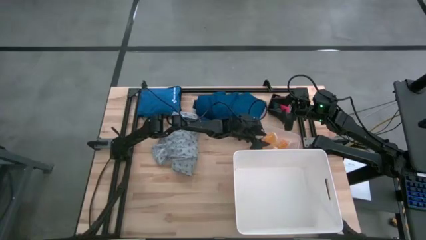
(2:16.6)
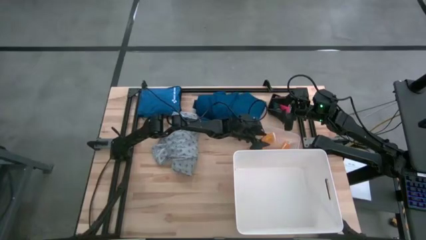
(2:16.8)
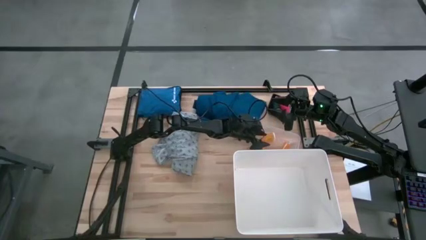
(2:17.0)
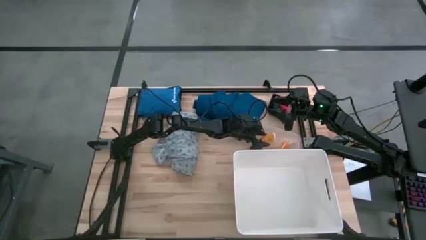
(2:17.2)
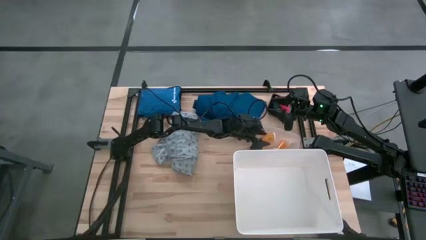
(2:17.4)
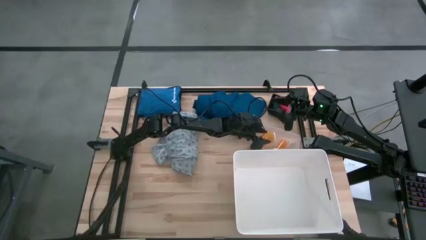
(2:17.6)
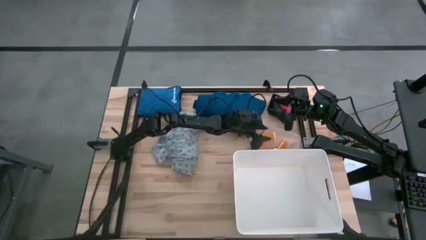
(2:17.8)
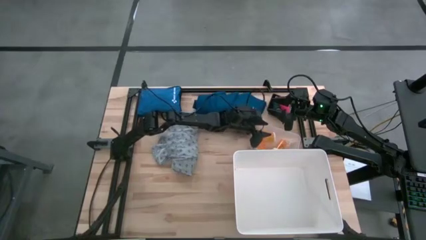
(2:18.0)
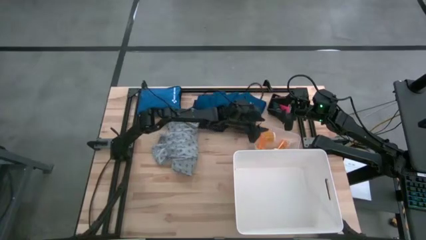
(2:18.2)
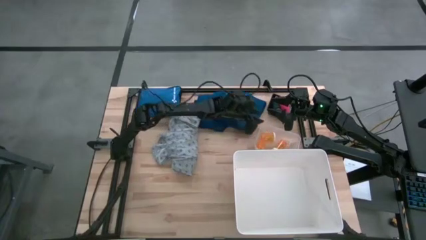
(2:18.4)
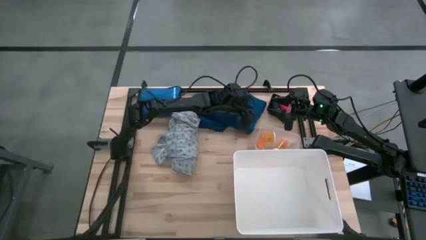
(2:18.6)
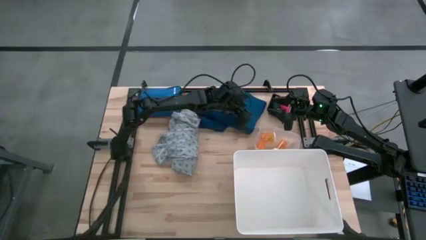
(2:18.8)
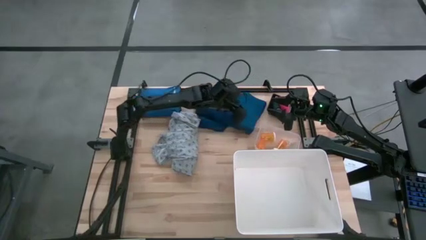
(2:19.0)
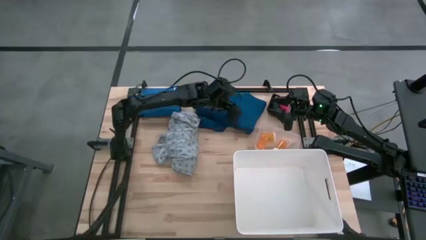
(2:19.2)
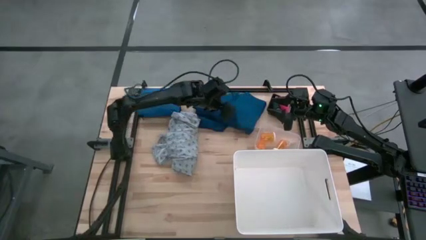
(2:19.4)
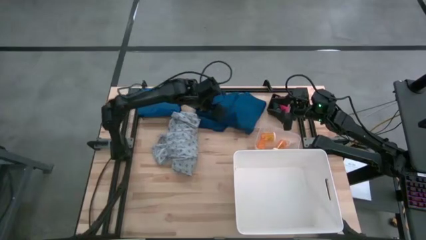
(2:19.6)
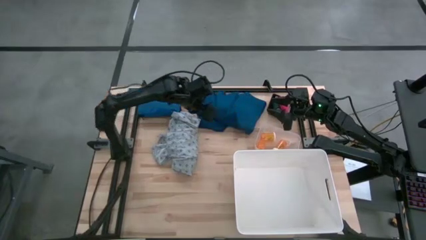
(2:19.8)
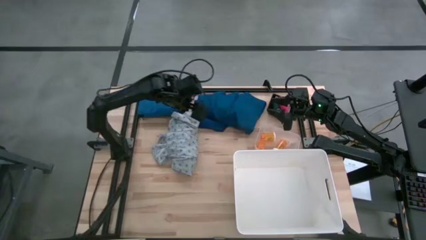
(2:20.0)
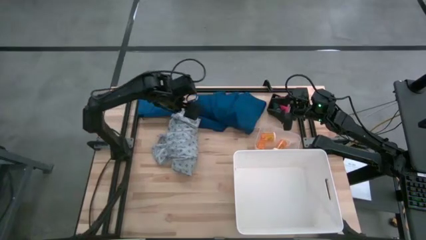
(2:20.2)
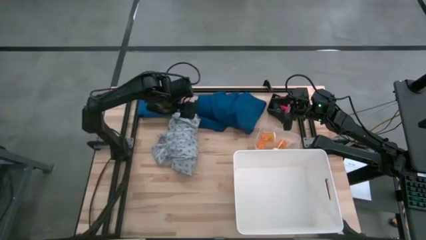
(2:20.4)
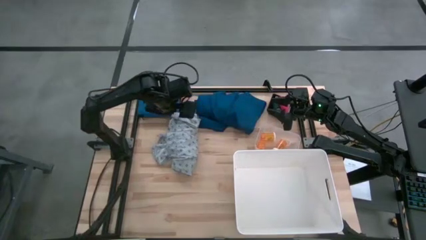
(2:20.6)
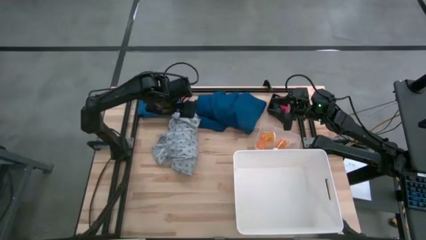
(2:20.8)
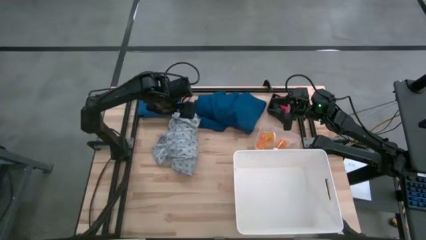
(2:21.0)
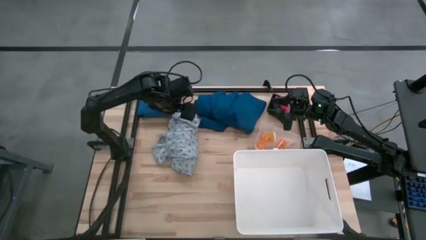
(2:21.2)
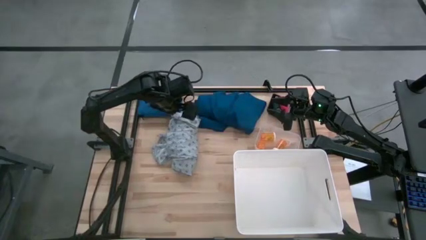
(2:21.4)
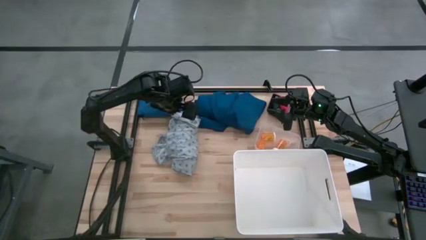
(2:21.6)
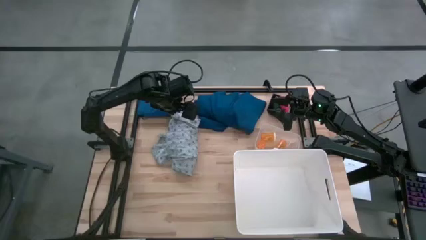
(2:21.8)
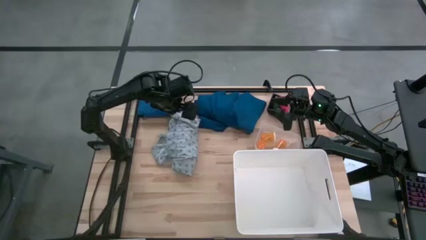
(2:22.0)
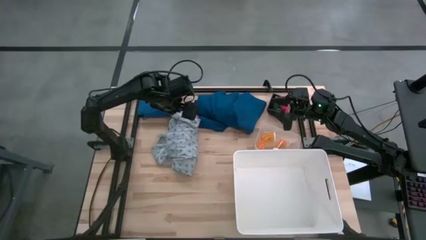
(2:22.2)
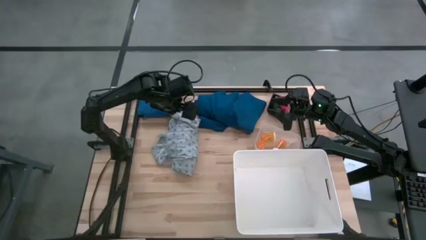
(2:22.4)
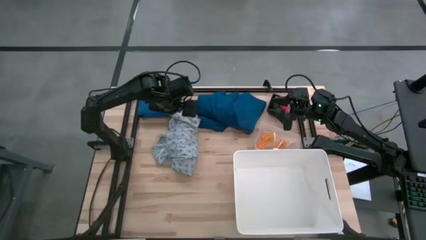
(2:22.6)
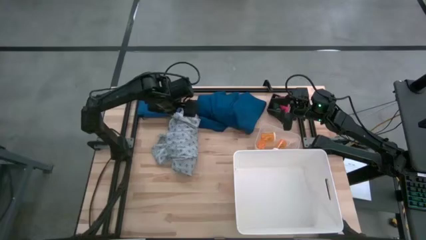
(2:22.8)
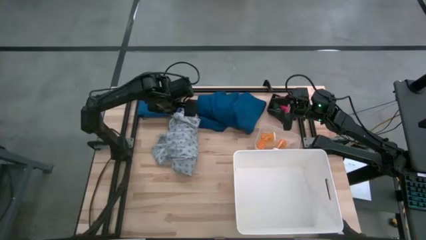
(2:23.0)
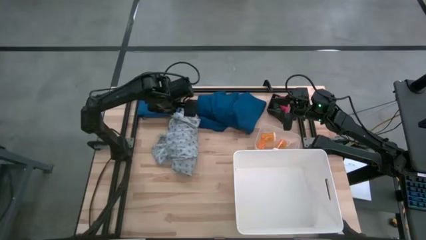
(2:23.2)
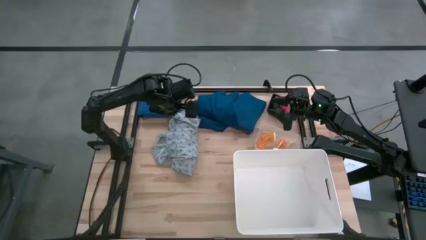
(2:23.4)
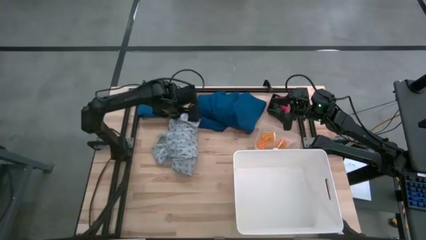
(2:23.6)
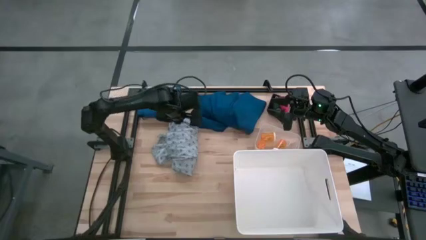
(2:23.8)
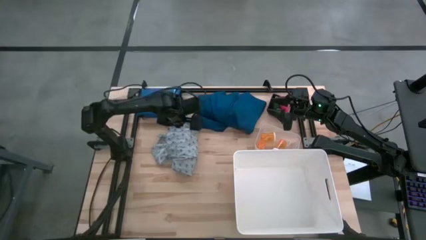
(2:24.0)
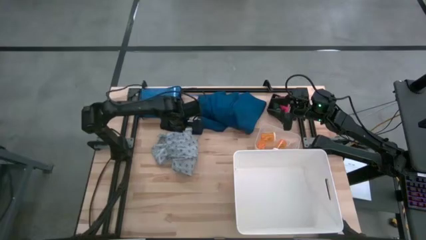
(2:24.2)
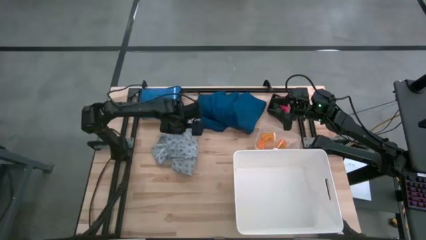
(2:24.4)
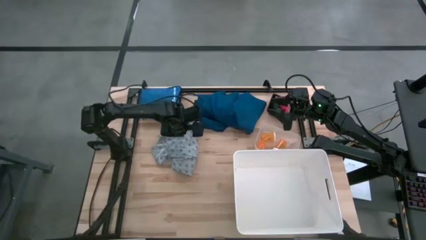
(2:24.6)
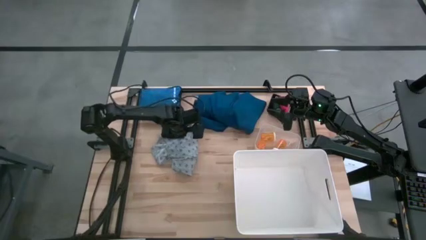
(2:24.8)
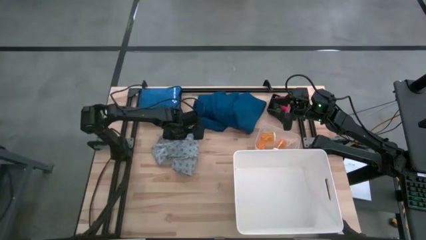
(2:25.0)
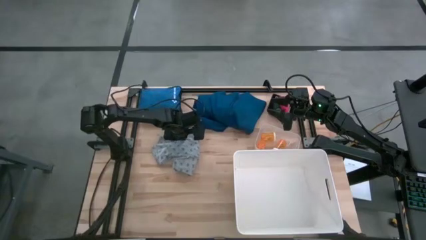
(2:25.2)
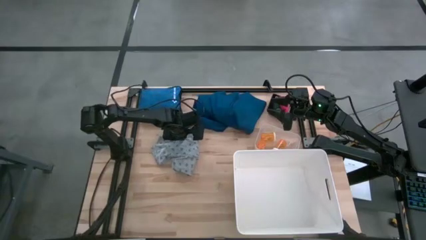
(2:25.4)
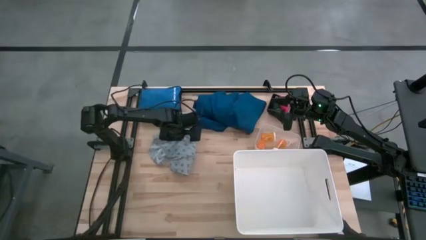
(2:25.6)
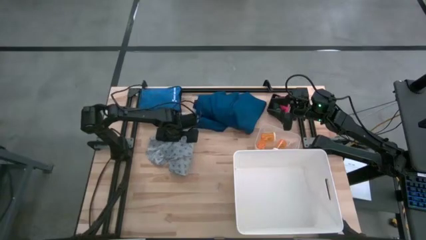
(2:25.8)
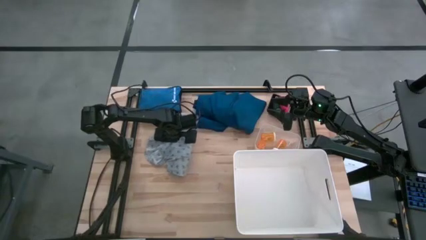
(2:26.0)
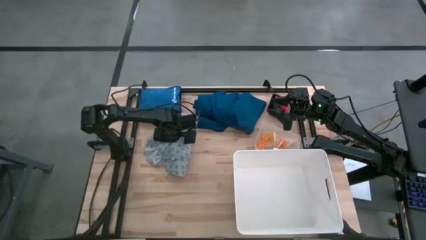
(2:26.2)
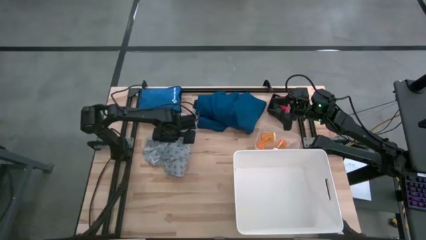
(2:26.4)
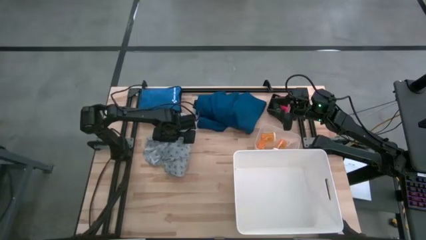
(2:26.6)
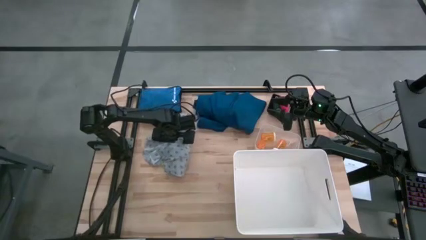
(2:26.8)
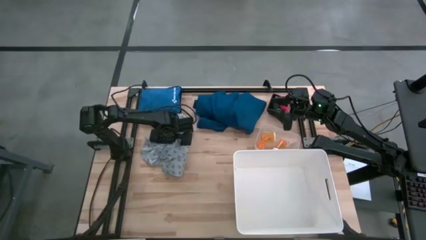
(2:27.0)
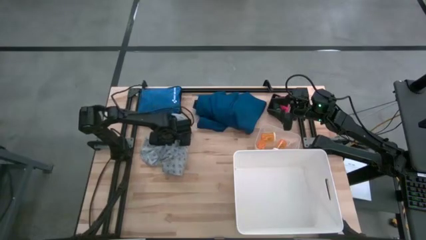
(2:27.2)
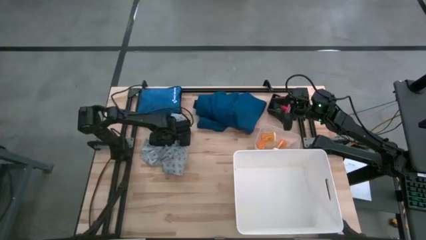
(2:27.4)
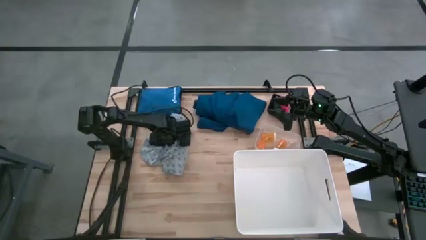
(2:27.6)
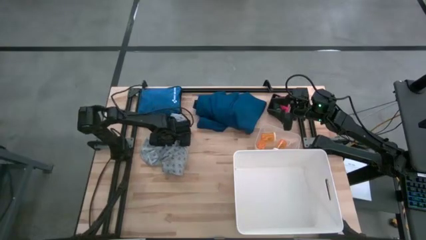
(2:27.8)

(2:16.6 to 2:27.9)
Task: Pick & place medical supplies in basket/bin
Put the gray patterned patient gown into the white bin

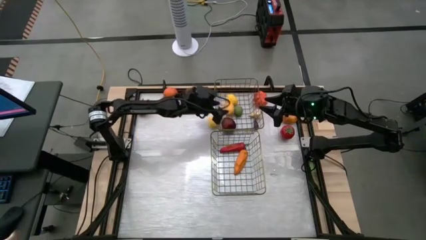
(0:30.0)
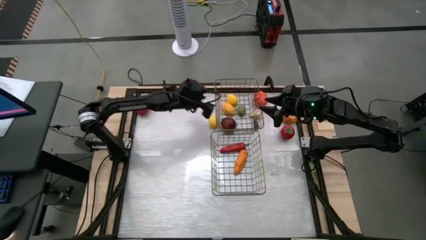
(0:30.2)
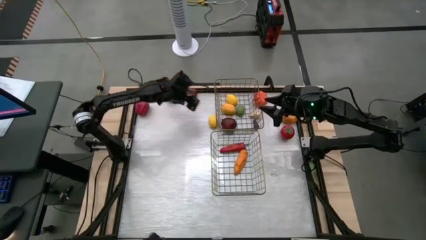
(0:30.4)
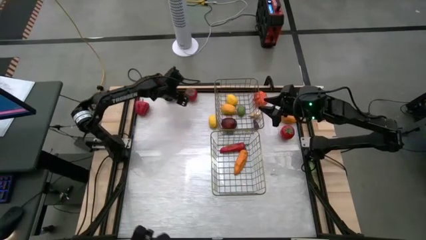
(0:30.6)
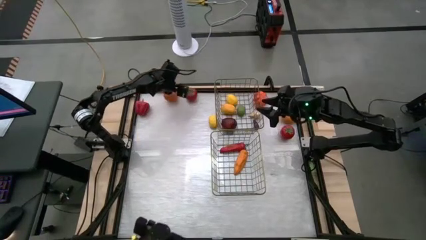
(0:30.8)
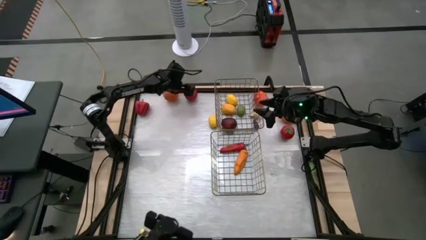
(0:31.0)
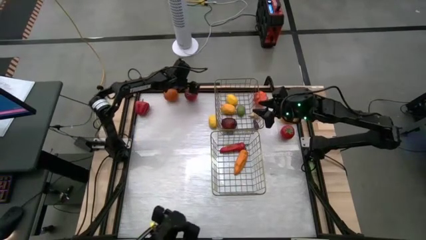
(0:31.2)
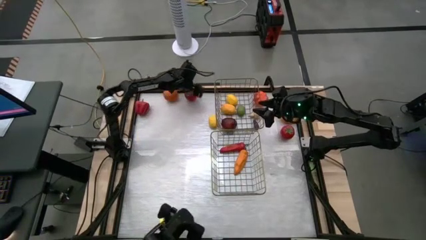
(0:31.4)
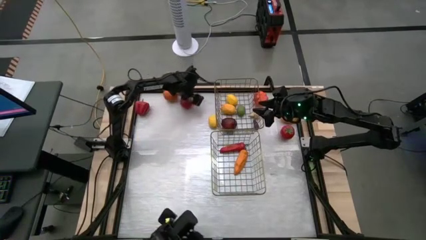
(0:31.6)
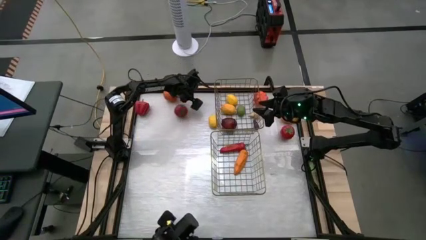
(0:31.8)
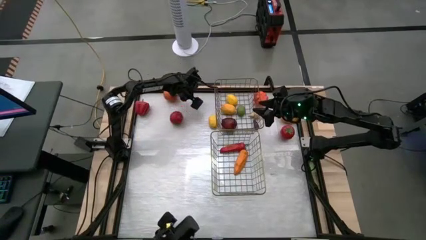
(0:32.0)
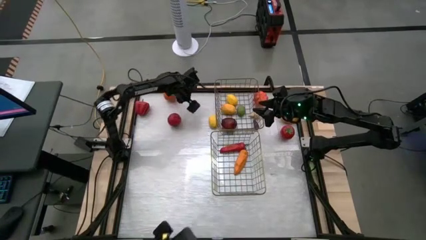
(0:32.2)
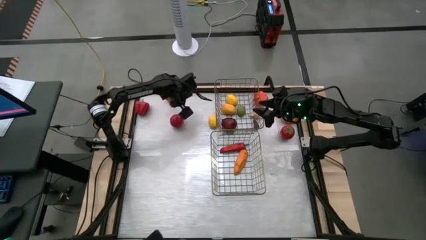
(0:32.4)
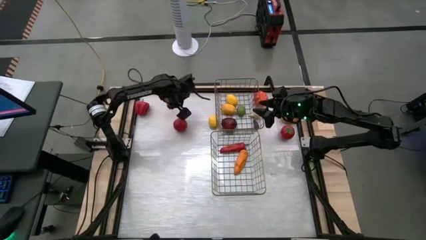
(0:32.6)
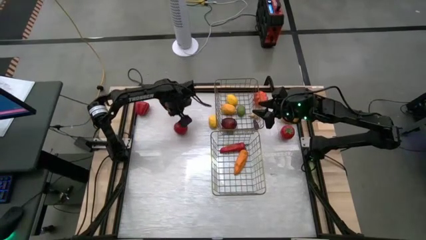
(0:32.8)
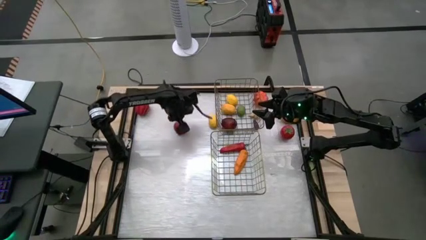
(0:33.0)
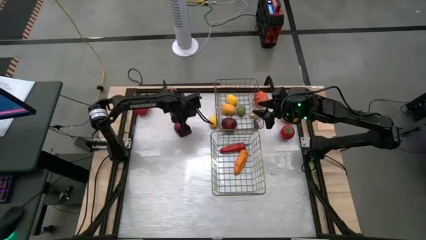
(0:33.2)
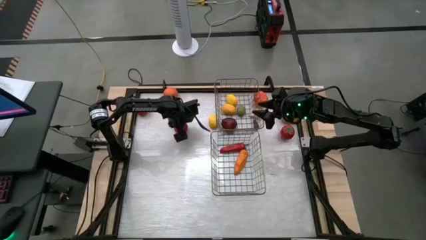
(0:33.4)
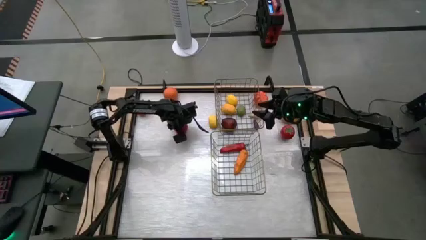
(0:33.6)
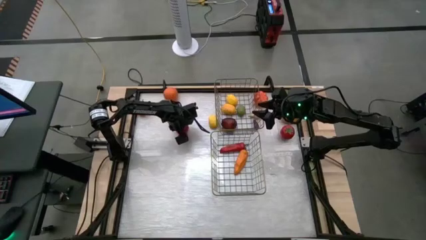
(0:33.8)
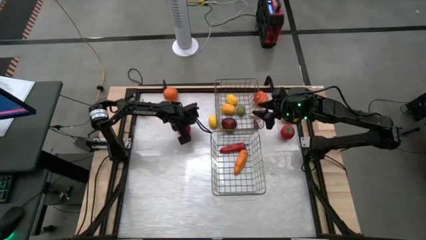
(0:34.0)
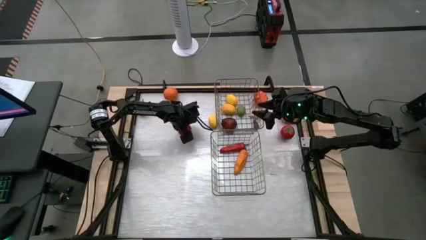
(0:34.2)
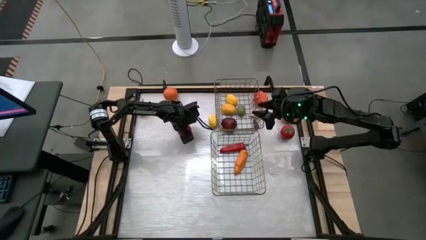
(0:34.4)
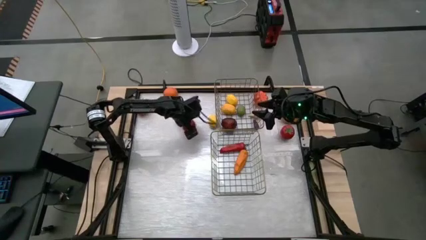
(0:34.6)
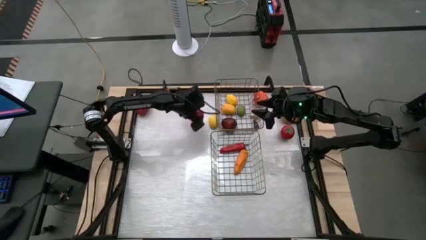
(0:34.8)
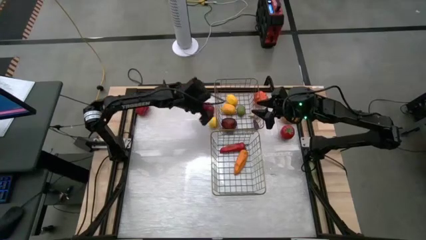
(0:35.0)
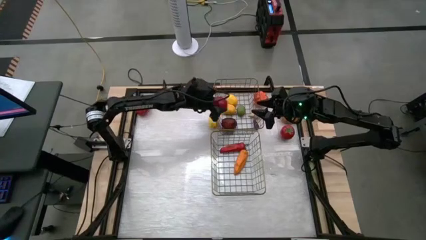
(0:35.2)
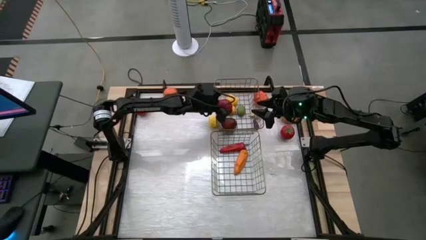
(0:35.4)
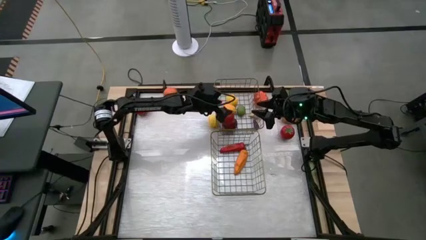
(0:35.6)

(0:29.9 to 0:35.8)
Task: Sort produce into baskets
Put the left red tomato into the top wire basket
